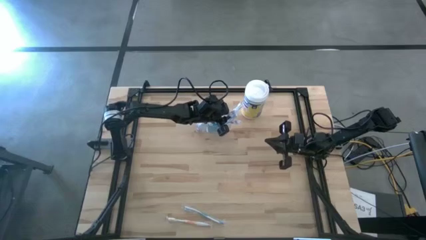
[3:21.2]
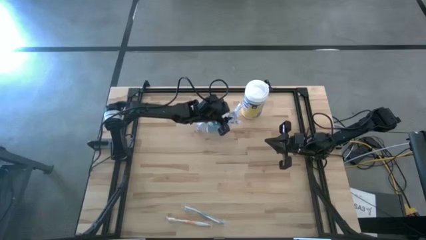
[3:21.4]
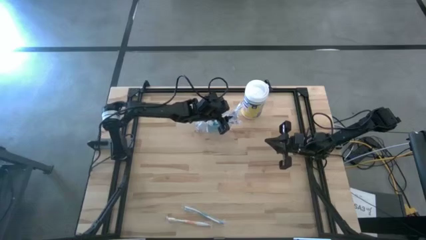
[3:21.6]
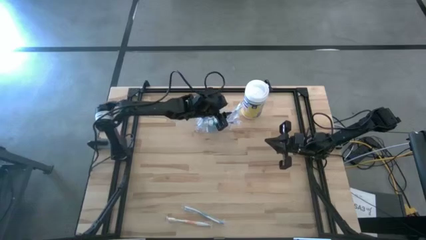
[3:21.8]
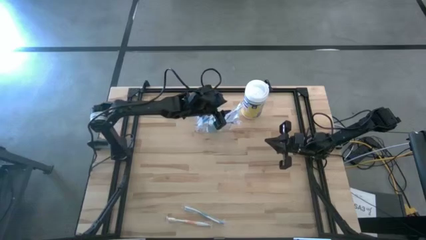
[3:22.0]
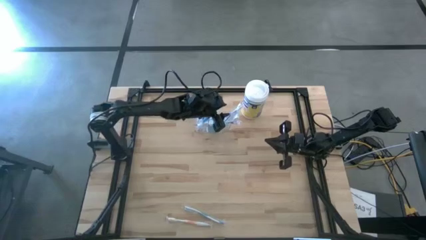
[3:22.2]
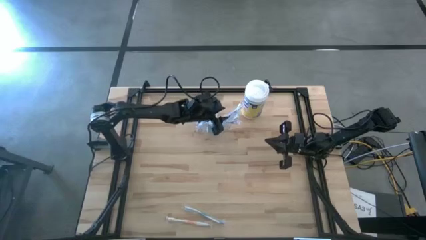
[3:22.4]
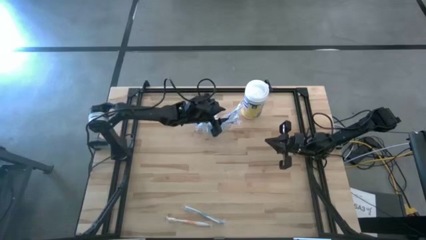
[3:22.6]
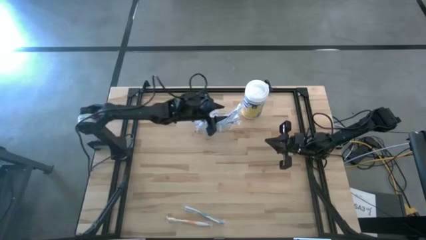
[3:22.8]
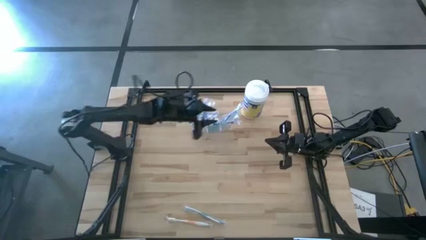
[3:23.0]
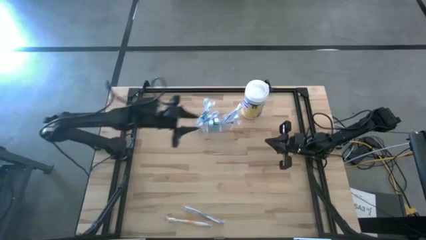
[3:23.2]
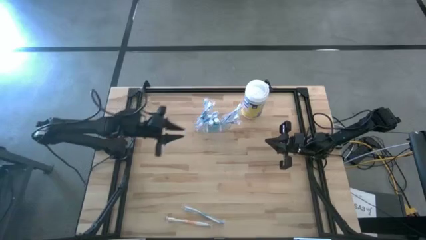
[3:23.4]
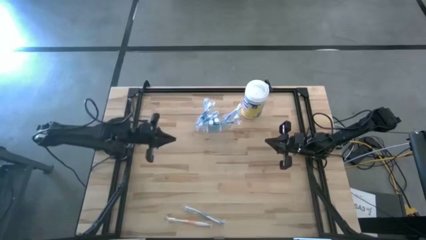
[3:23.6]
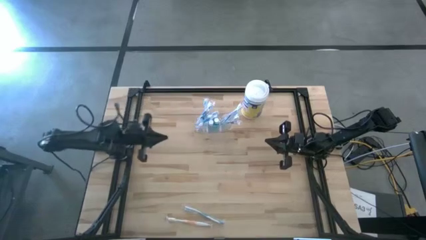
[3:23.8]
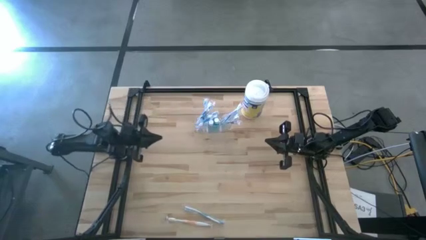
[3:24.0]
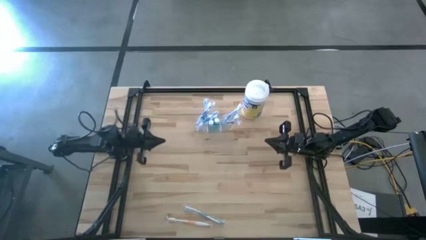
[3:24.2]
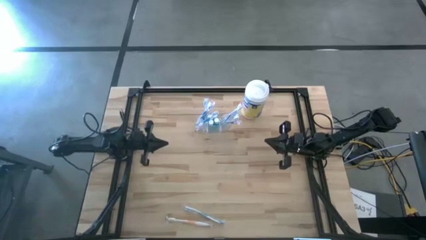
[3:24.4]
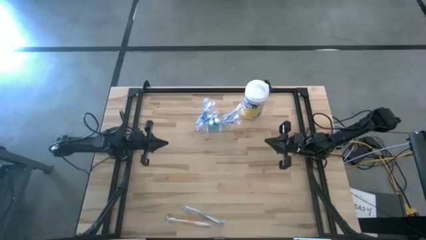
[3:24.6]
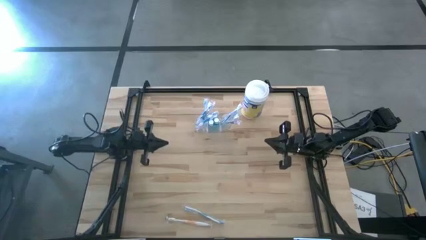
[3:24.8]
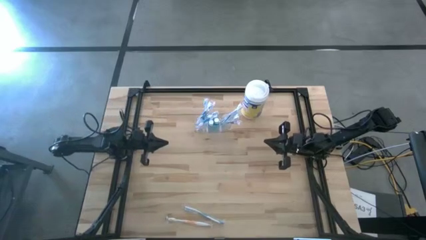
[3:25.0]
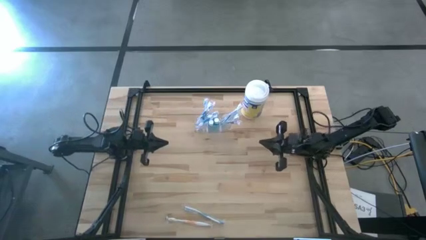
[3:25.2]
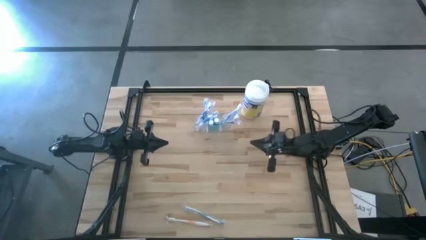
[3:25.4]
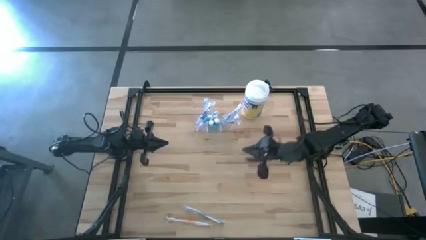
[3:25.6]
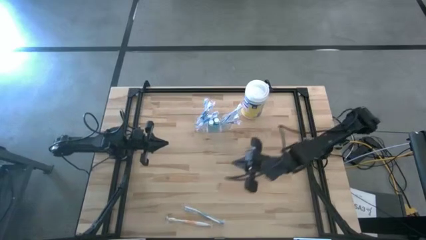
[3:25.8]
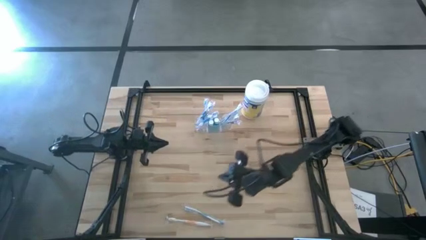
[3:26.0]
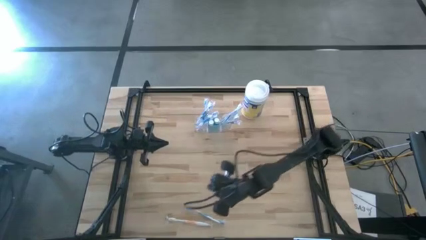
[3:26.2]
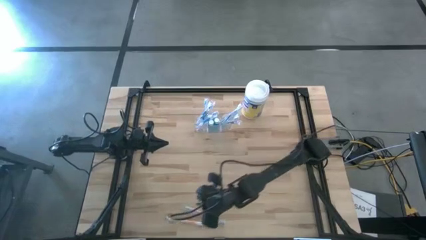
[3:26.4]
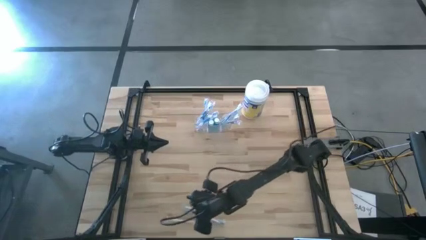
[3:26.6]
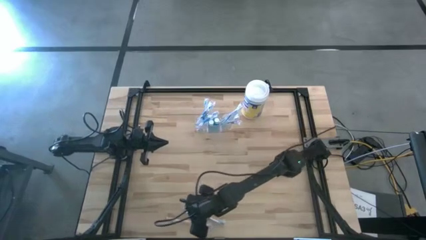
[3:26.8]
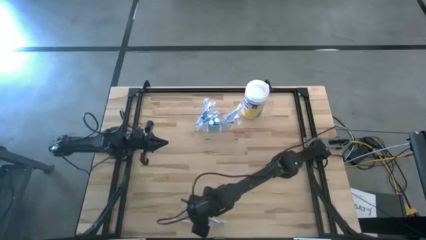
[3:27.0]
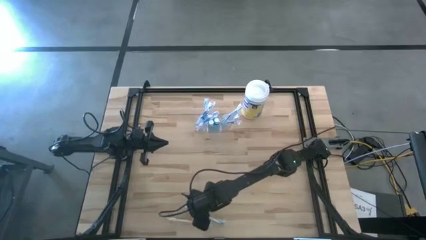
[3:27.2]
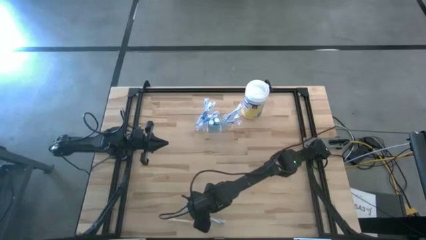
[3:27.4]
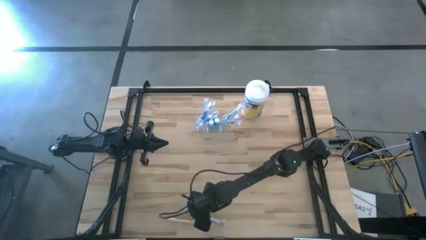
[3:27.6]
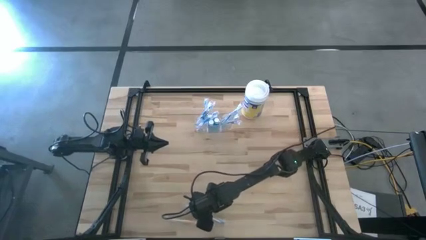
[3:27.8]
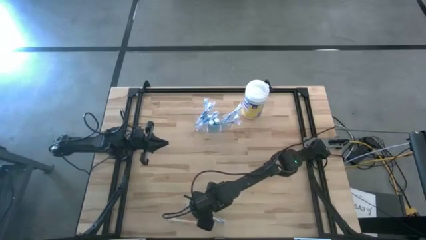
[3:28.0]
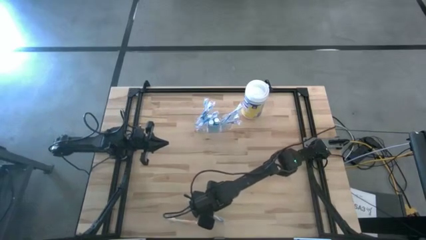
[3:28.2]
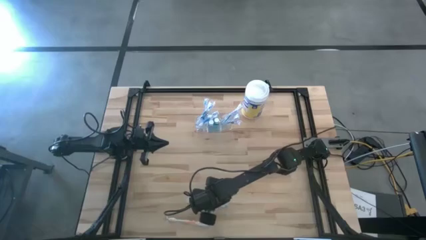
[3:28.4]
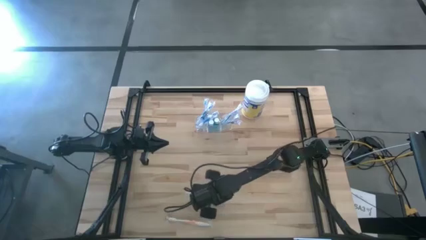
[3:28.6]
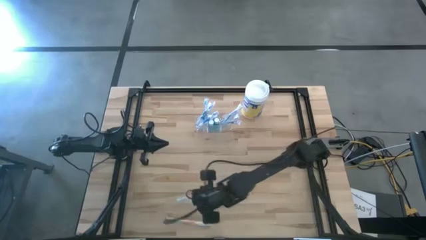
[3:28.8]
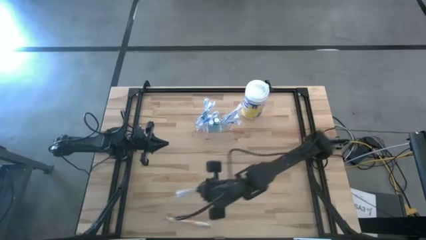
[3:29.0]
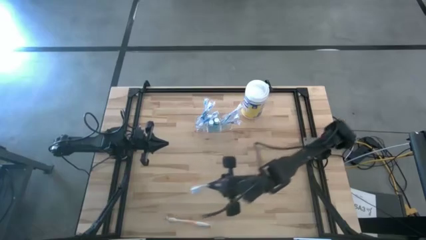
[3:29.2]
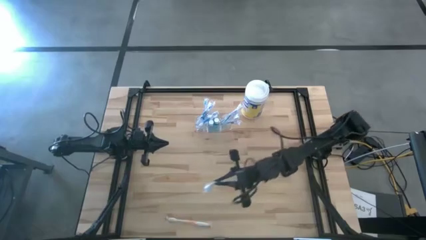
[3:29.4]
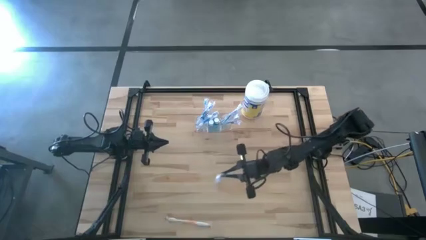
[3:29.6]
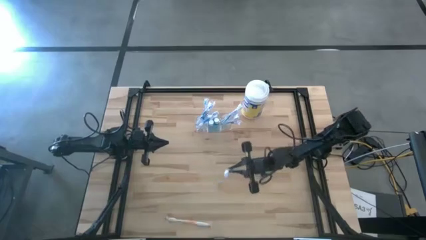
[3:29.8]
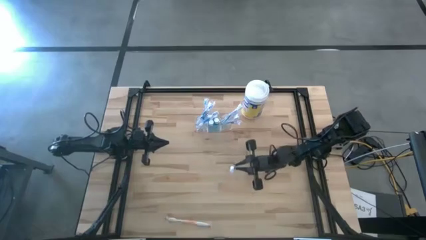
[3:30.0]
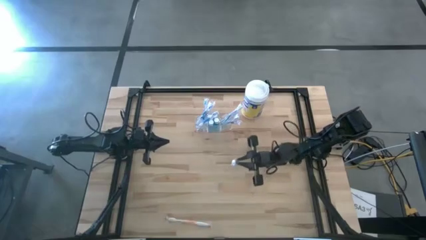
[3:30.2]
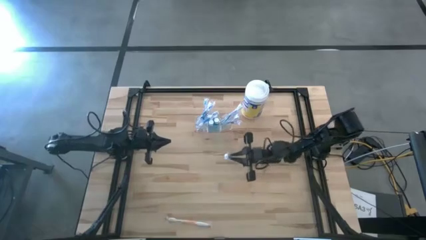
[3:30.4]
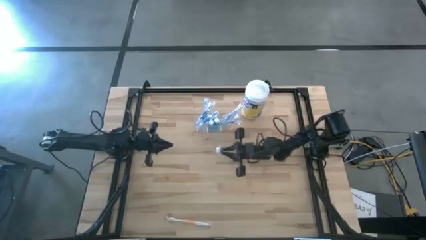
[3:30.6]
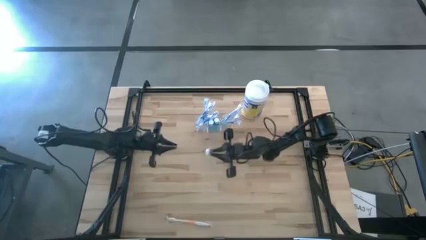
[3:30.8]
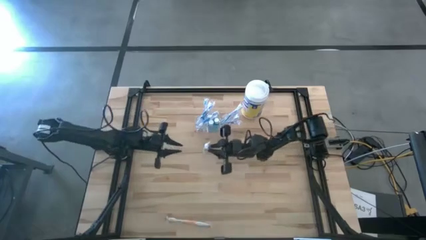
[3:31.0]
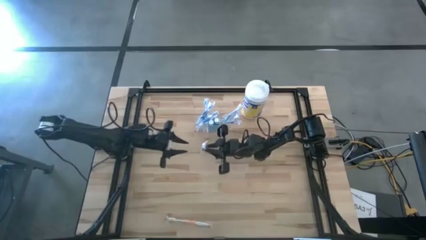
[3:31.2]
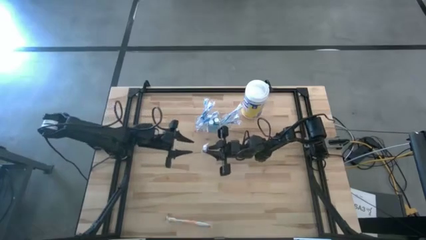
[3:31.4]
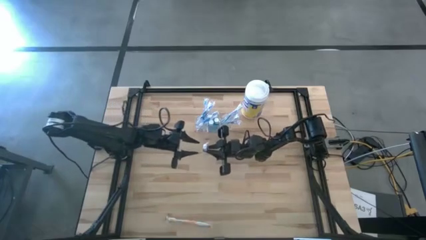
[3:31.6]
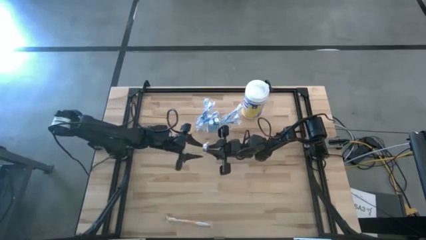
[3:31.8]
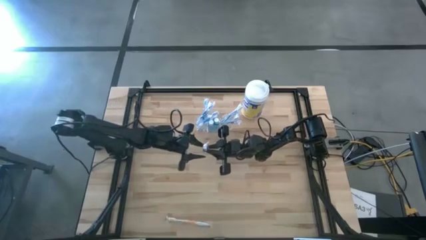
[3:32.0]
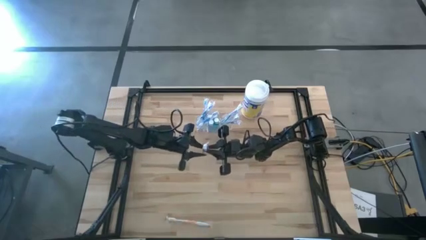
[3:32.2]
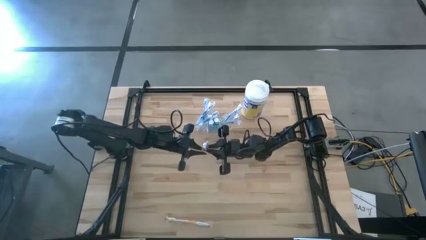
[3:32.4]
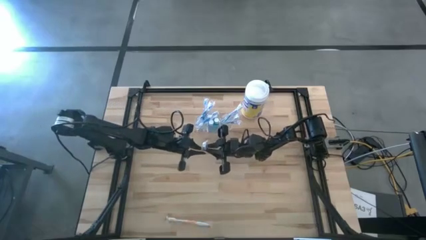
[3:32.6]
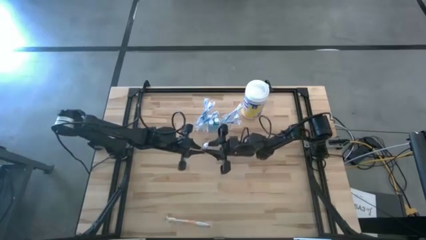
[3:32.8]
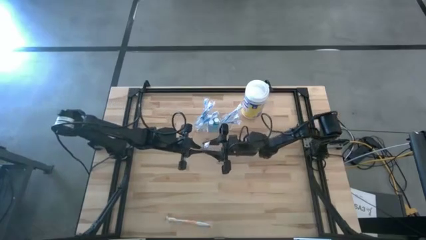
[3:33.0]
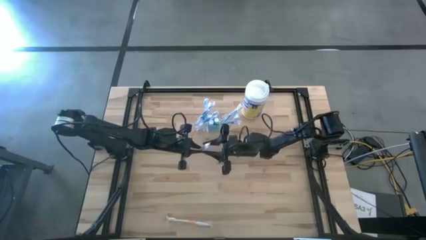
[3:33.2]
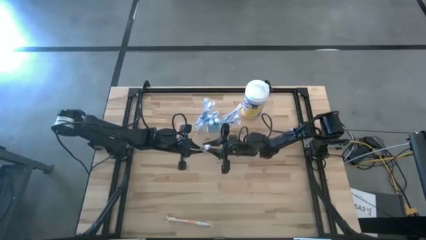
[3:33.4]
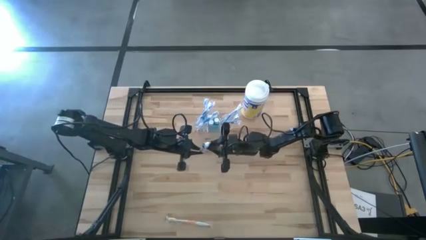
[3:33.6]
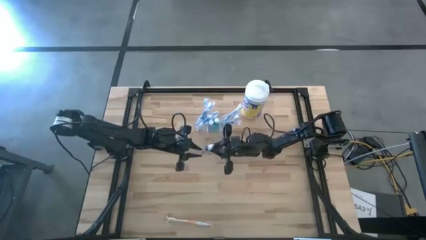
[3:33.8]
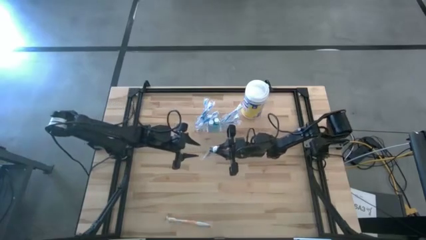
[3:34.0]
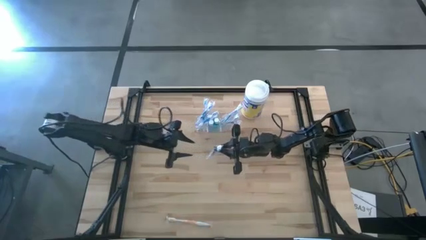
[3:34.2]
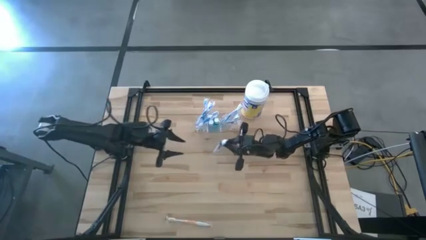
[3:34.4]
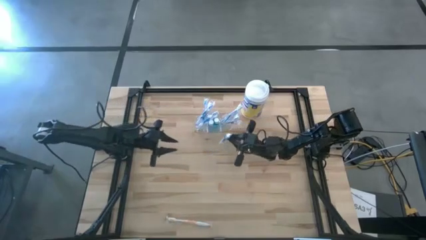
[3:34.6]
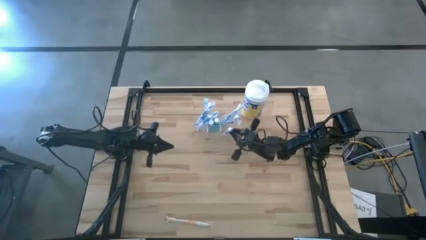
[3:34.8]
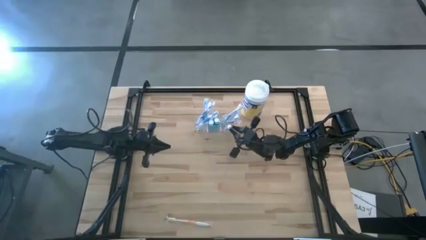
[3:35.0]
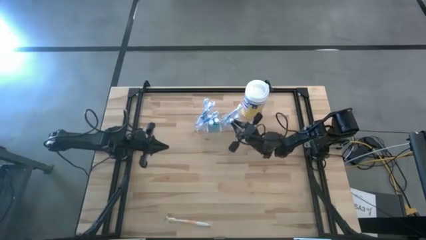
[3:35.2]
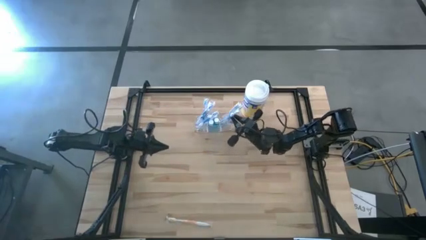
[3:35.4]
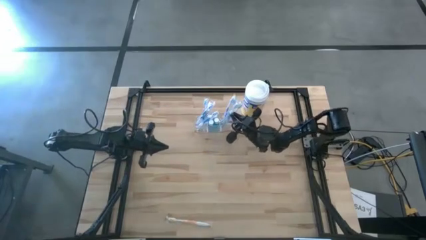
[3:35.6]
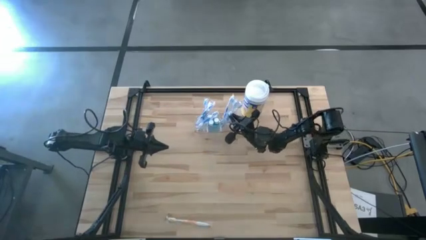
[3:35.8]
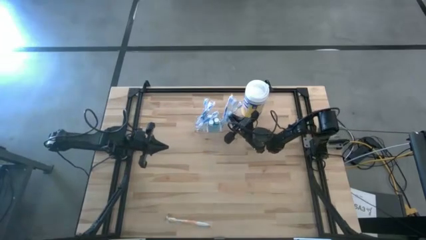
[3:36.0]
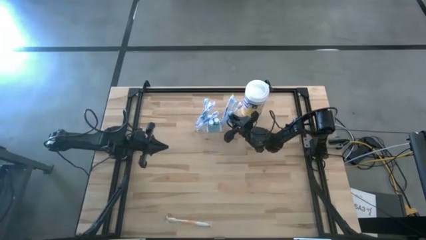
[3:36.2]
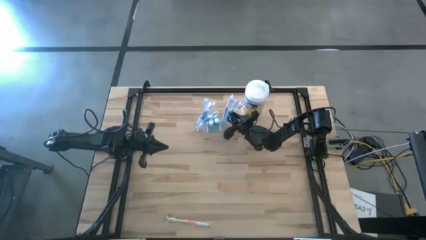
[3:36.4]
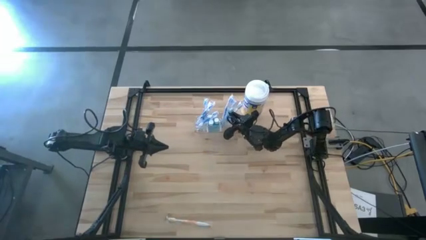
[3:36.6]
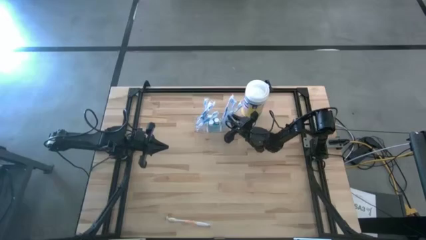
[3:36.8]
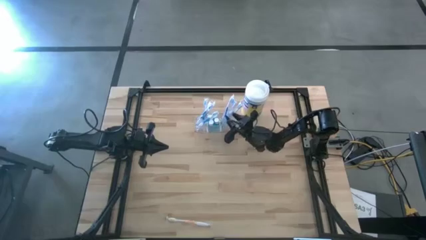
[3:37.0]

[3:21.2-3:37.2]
Task: Pick & Place toothbrushing station
Put the blue toothbrush into the right section of the transparent organizer
